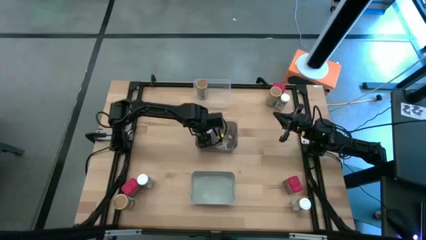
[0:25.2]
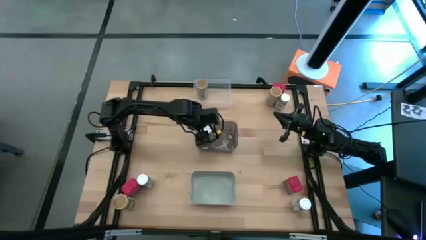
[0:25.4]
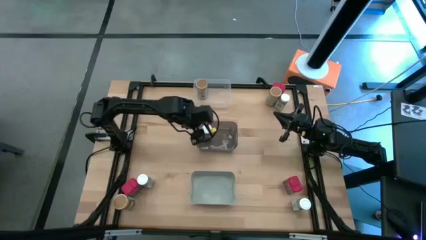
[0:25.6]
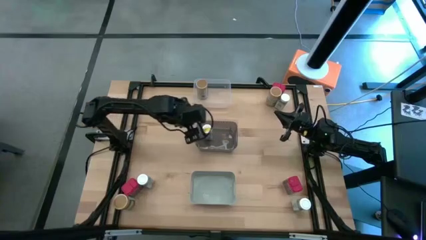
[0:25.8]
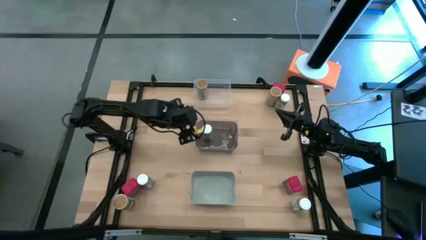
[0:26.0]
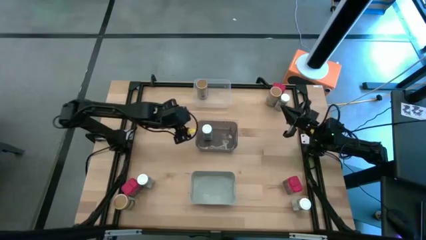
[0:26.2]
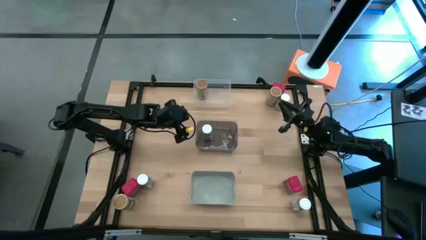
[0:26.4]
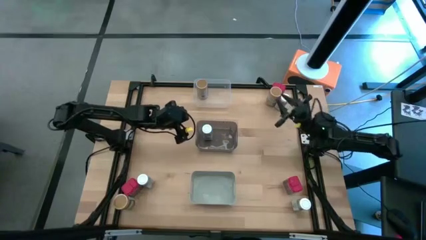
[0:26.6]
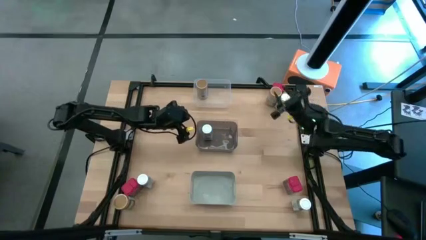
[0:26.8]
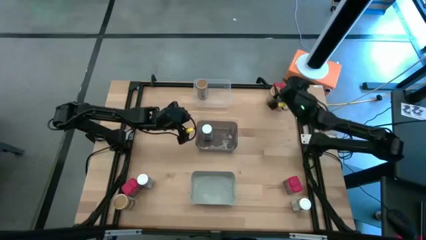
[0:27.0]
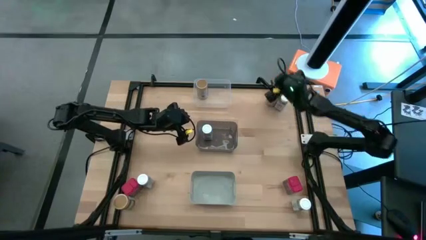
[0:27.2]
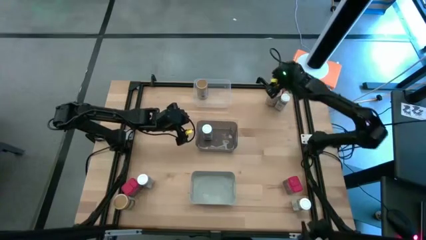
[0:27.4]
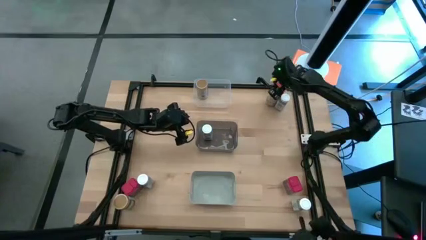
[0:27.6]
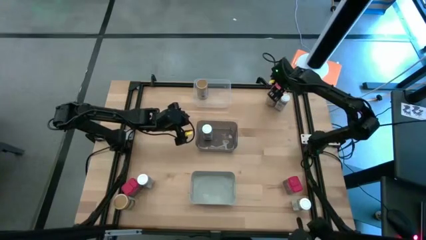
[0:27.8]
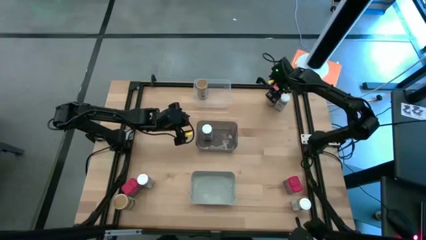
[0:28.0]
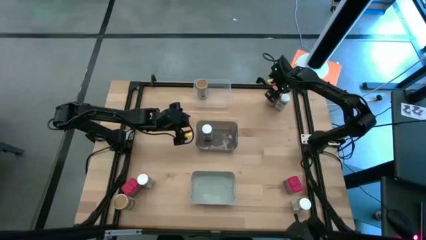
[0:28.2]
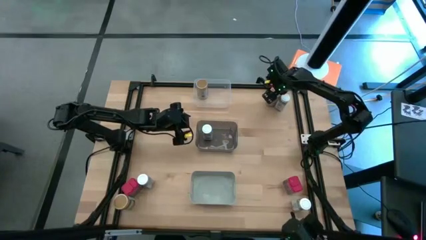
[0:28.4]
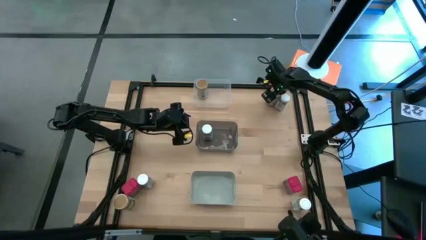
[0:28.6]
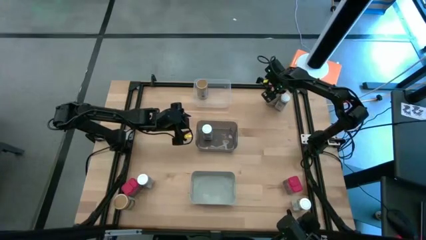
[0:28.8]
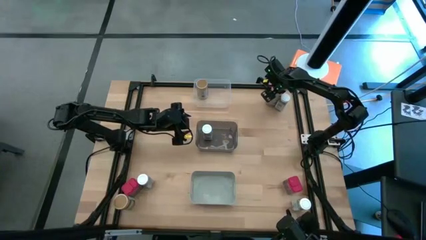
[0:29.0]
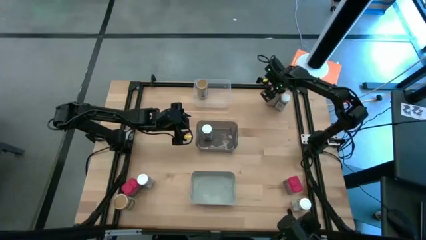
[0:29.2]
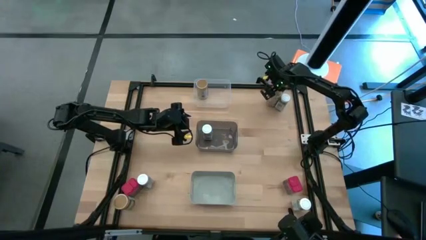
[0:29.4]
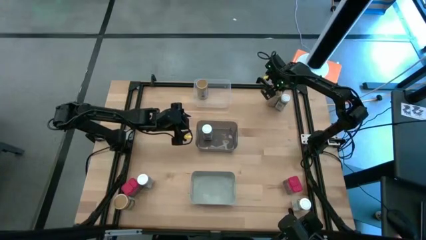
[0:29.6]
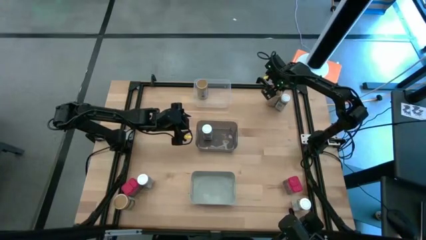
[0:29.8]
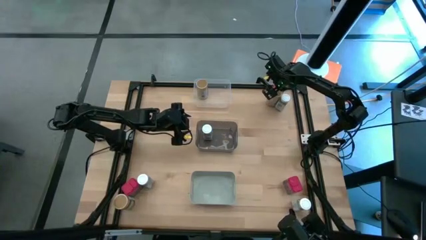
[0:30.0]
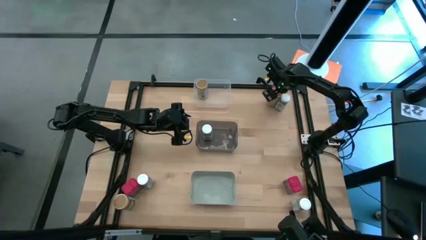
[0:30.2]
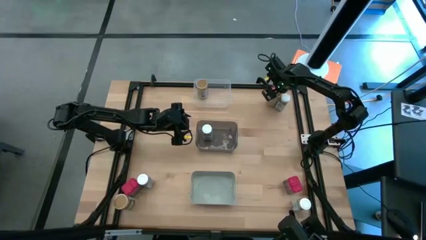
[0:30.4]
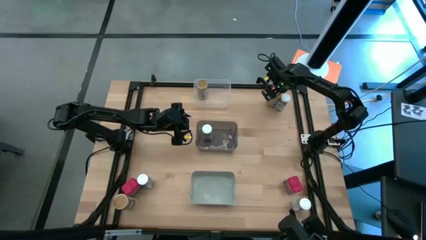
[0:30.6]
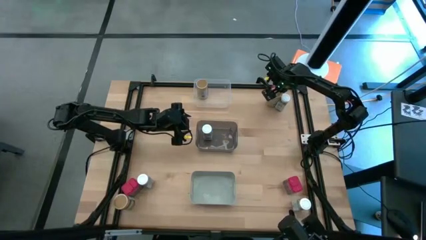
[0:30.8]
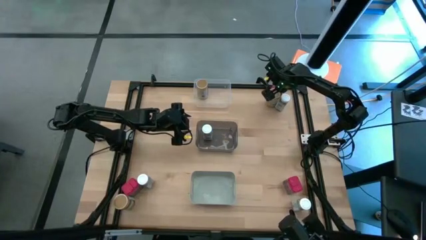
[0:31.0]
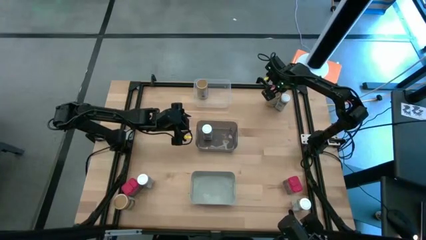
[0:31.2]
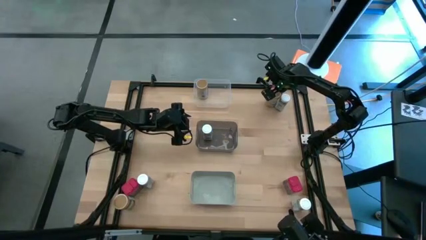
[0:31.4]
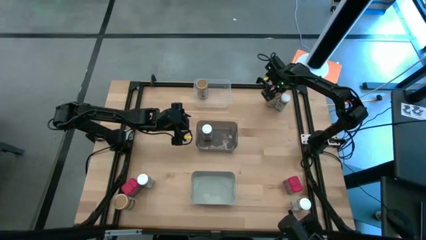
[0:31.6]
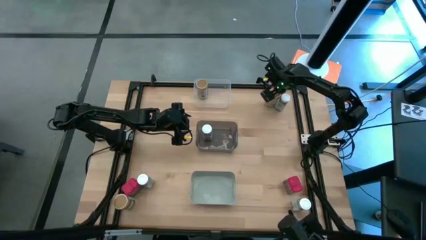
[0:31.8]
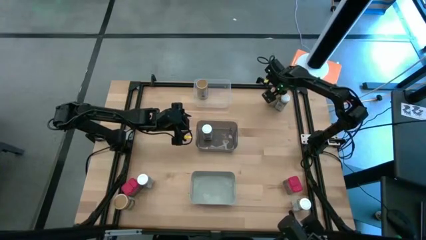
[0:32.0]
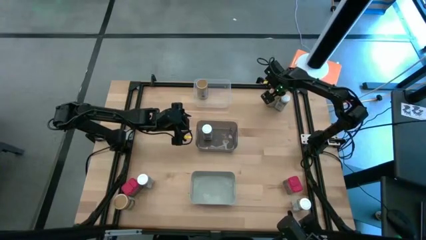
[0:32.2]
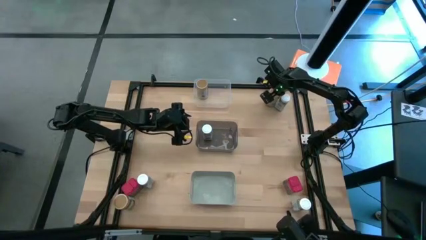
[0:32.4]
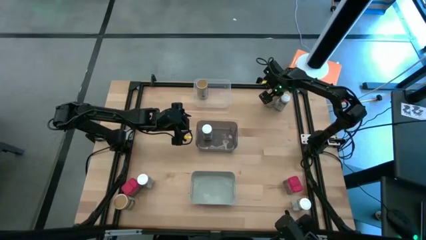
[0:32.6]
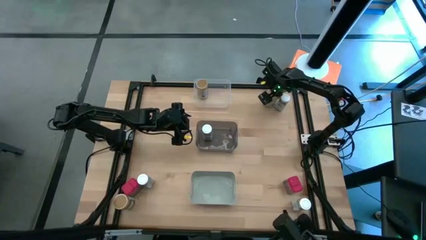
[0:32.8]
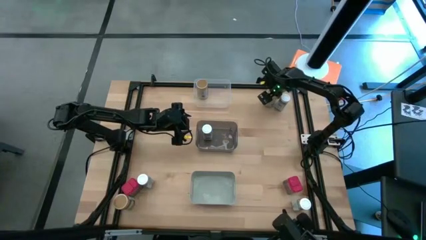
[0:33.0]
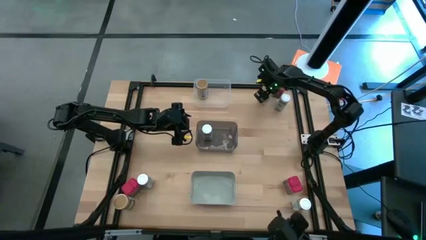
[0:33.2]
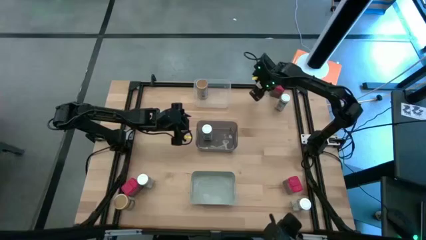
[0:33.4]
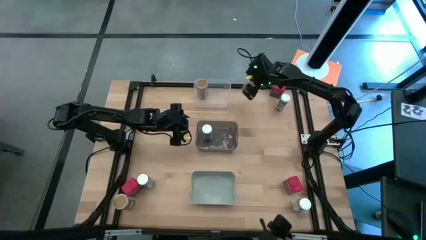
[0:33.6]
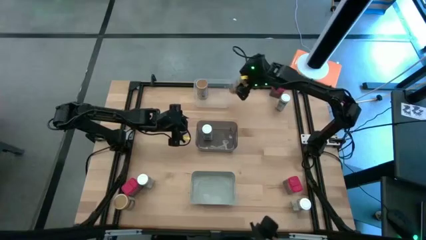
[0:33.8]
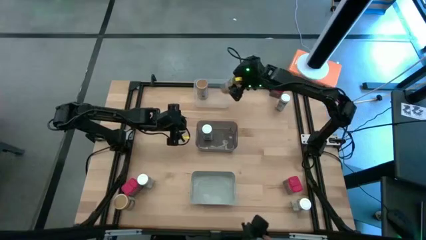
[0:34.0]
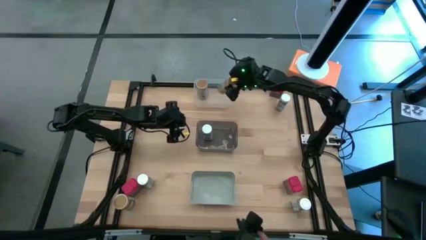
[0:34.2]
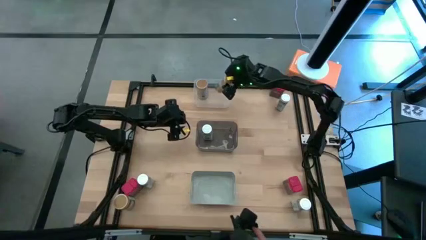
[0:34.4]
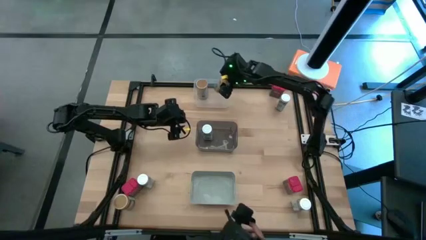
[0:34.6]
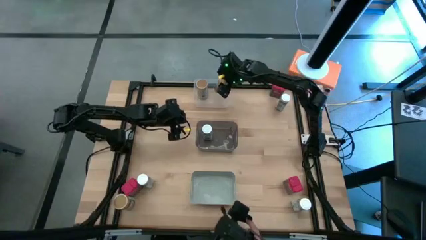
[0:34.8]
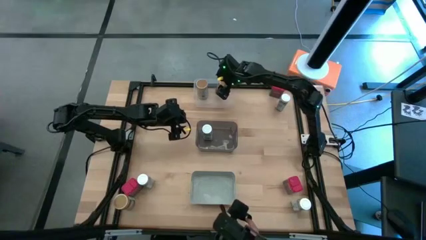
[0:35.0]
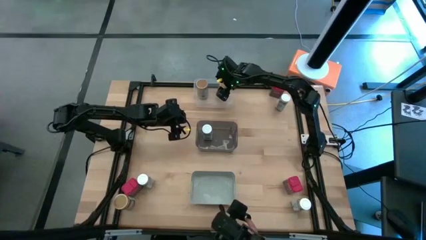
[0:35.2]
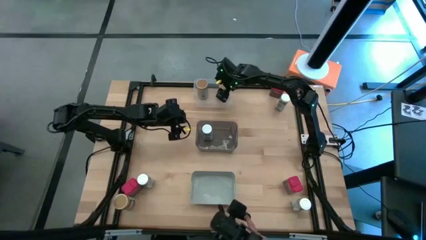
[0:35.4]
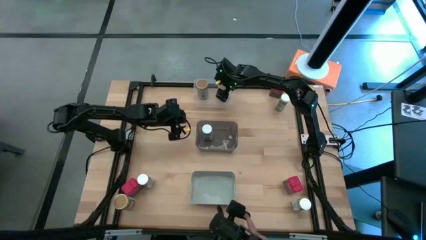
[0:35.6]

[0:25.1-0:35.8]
Task: Sort spices by type
Put the top gold seasoning bottle into the transparent bin

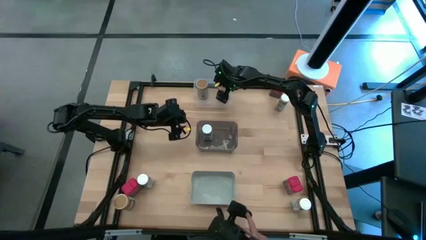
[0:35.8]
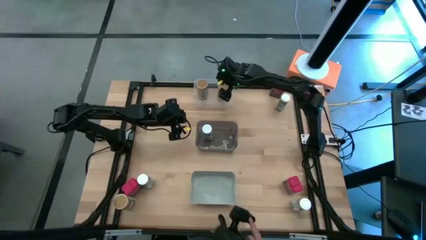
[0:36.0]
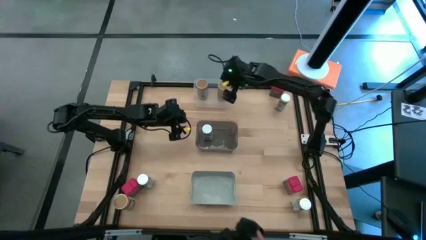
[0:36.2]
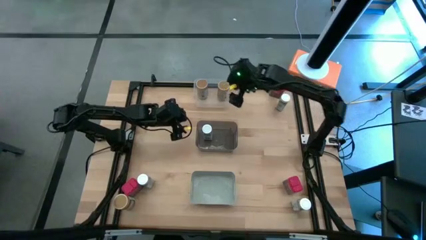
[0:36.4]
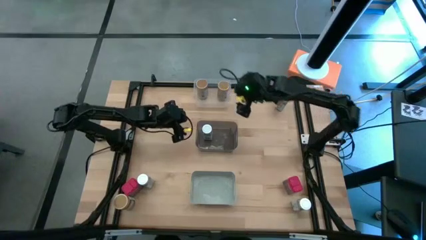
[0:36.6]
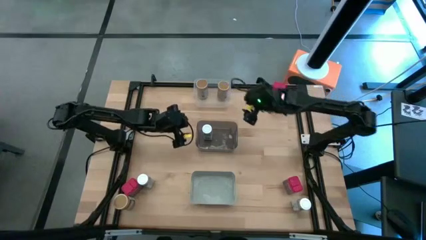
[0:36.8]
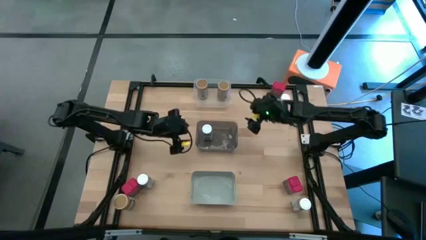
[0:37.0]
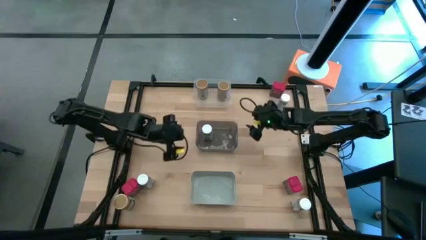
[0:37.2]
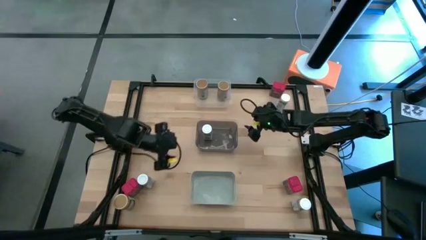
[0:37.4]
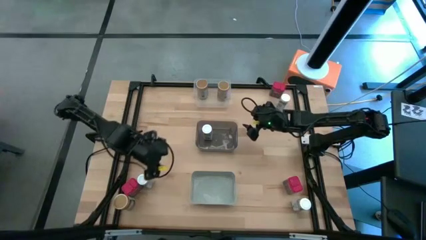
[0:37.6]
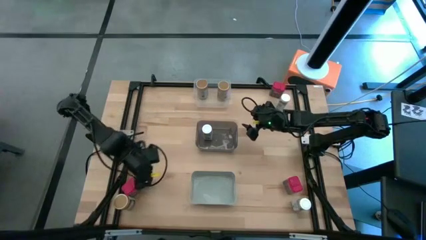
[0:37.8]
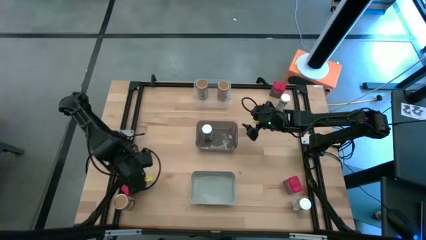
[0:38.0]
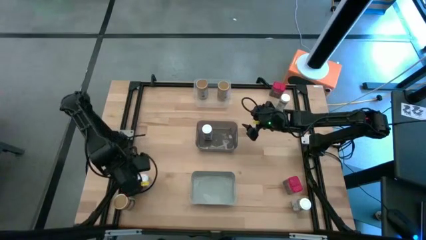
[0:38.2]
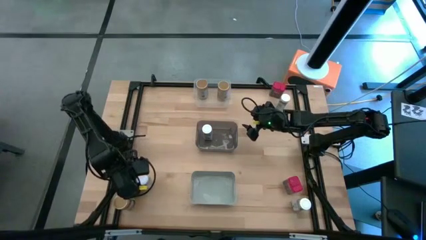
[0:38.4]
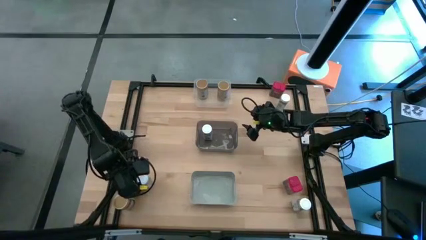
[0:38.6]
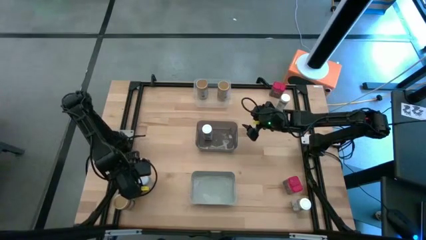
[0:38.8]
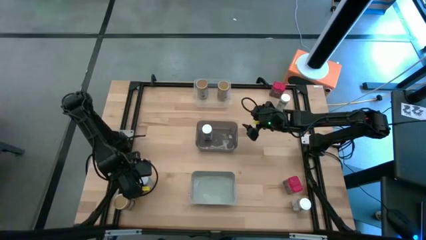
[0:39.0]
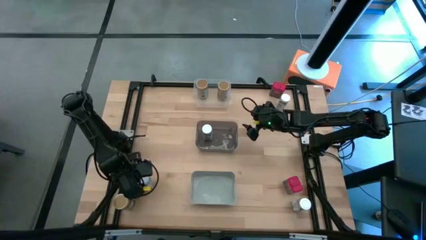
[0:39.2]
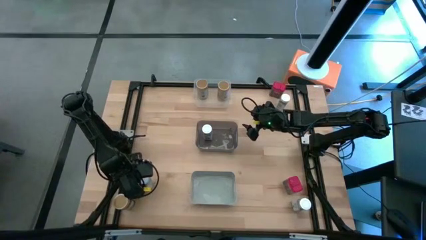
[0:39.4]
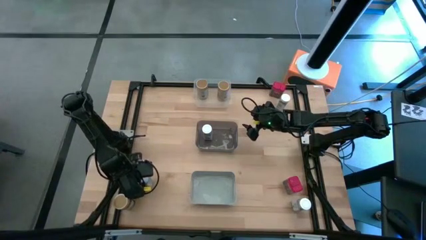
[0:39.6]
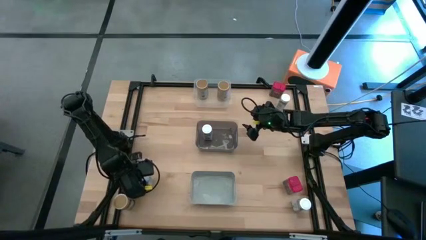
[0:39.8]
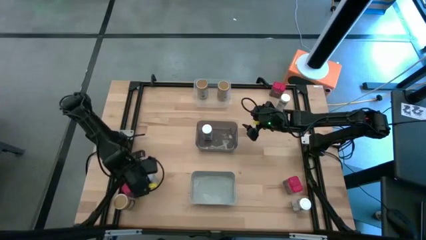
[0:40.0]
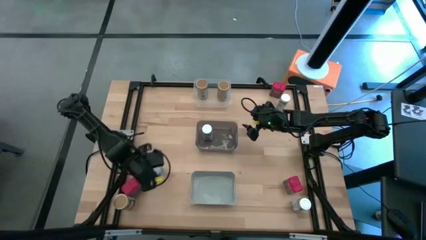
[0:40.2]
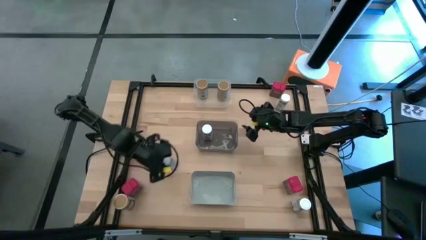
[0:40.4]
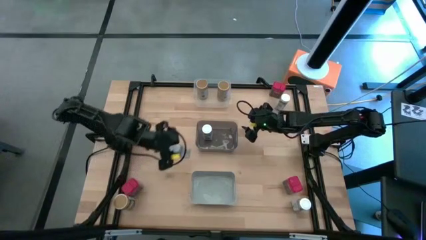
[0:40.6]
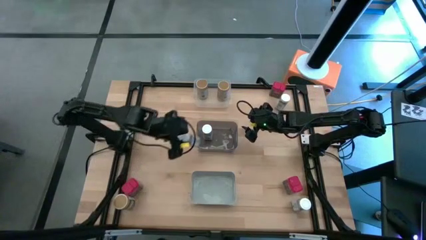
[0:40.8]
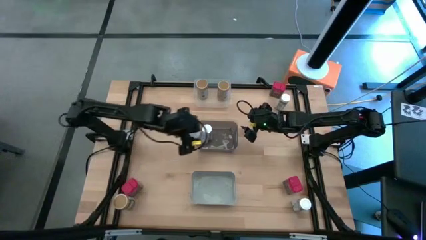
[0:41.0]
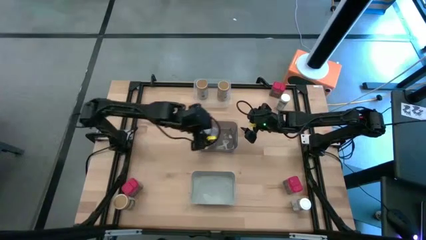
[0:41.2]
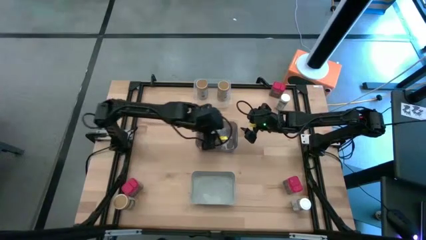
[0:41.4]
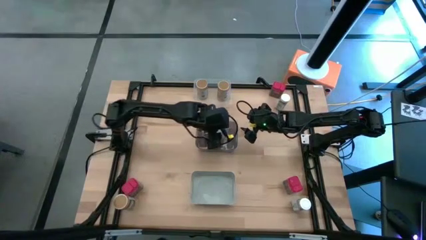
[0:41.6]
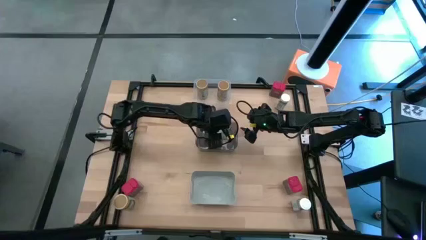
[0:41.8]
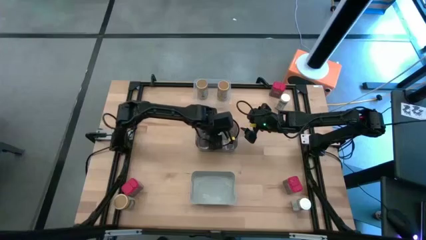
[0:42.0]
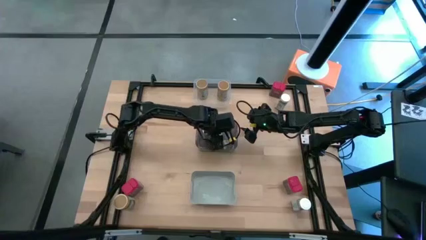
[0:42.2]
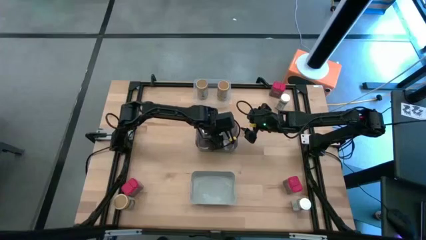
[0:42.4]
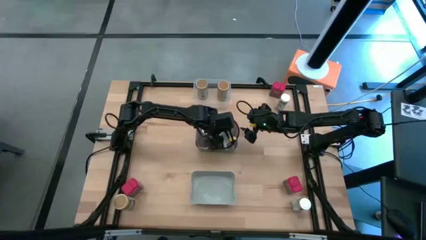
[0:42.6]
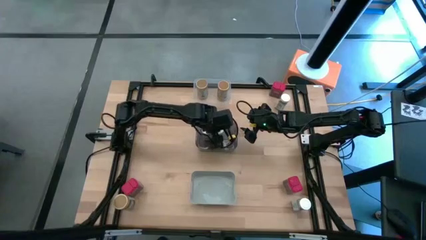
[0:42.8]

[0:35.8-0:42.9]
Put the bottom left white seasoning bottle into the black bin
